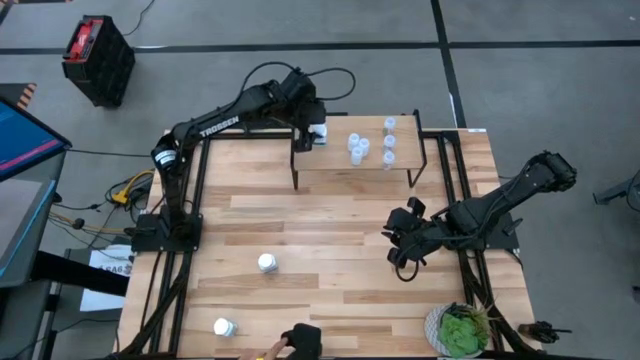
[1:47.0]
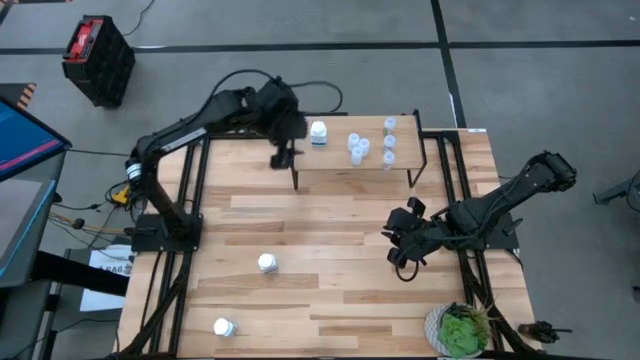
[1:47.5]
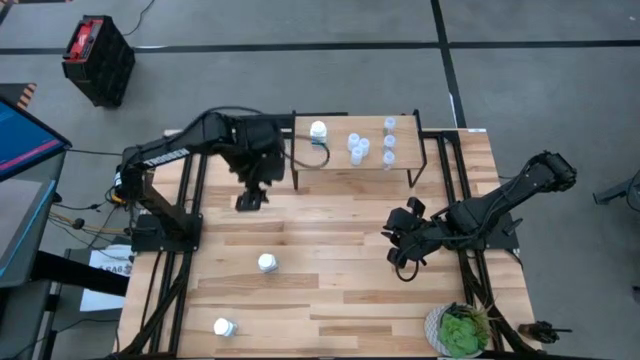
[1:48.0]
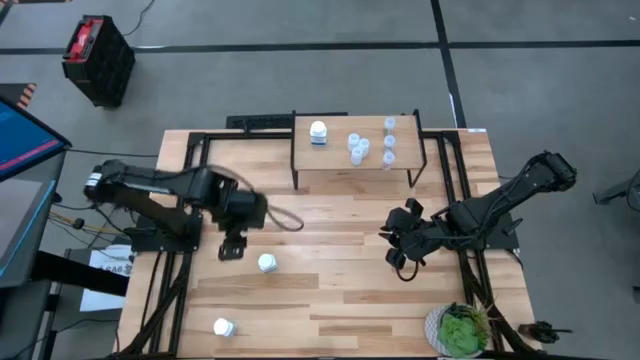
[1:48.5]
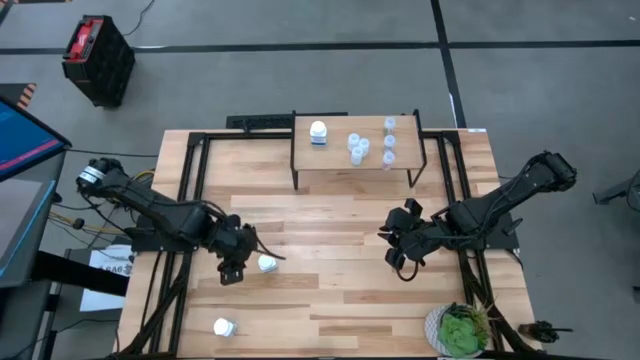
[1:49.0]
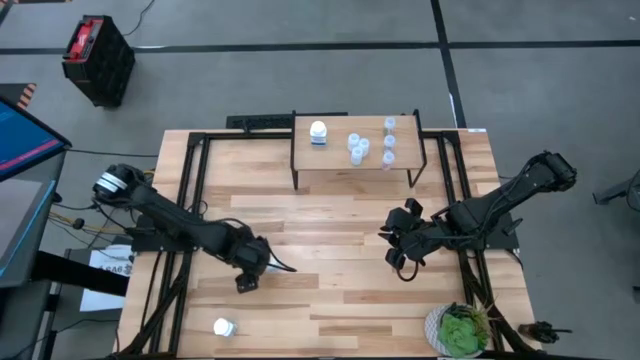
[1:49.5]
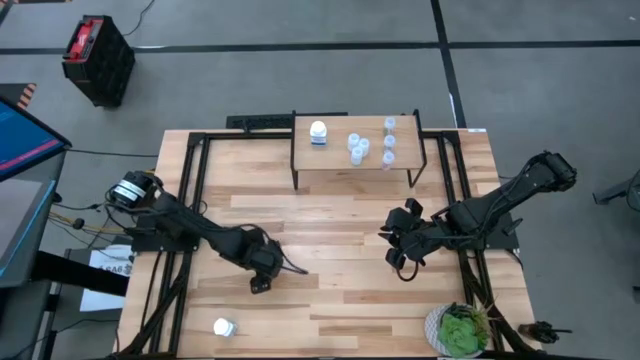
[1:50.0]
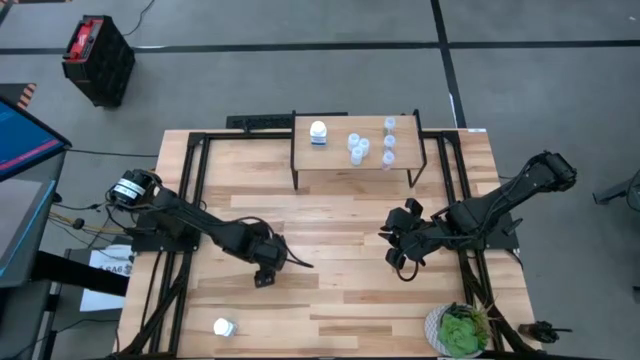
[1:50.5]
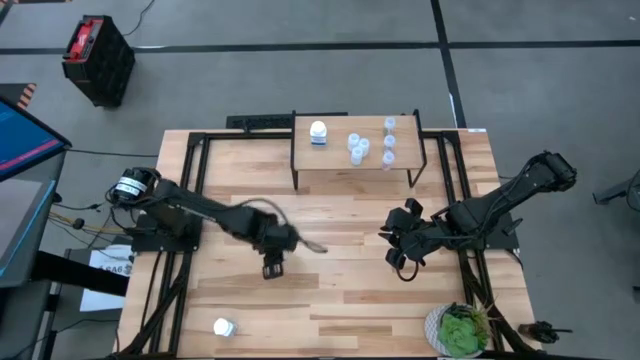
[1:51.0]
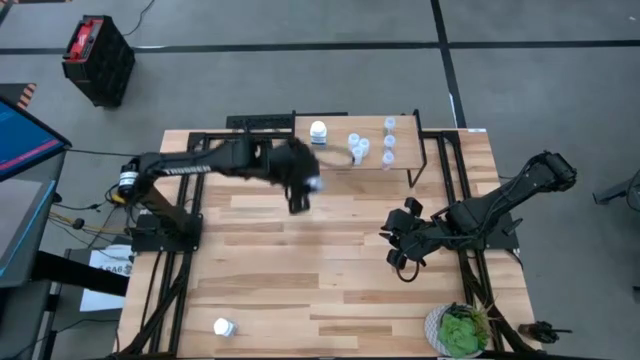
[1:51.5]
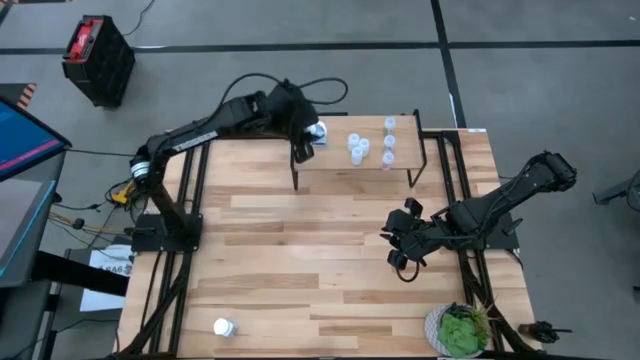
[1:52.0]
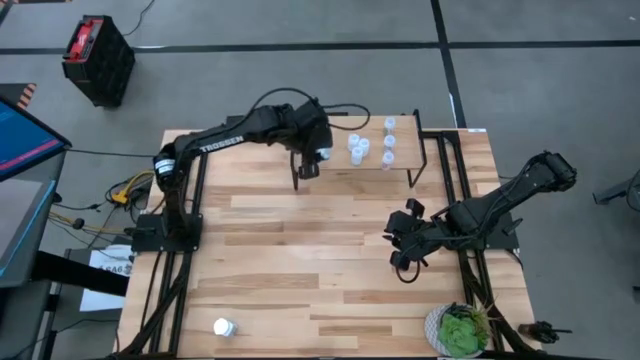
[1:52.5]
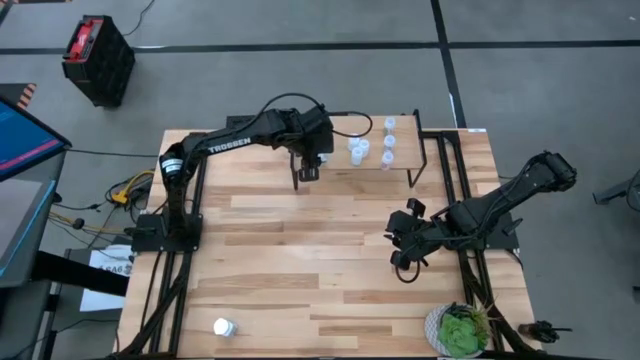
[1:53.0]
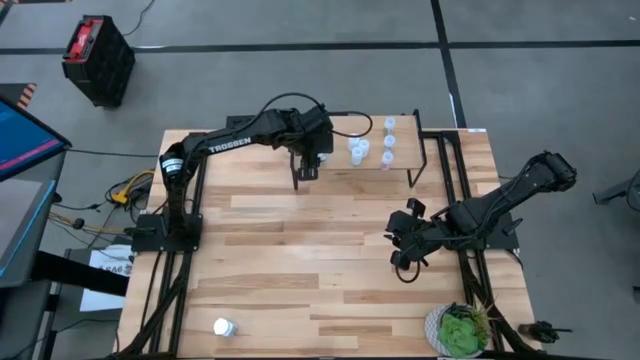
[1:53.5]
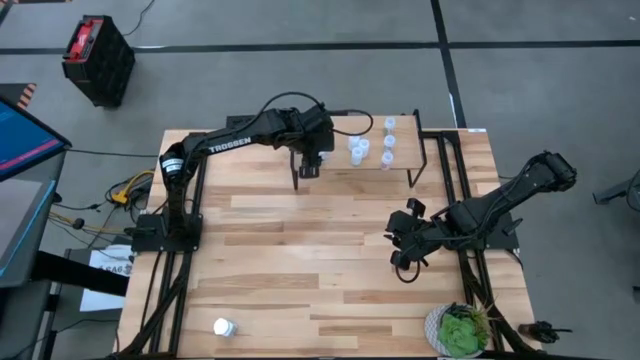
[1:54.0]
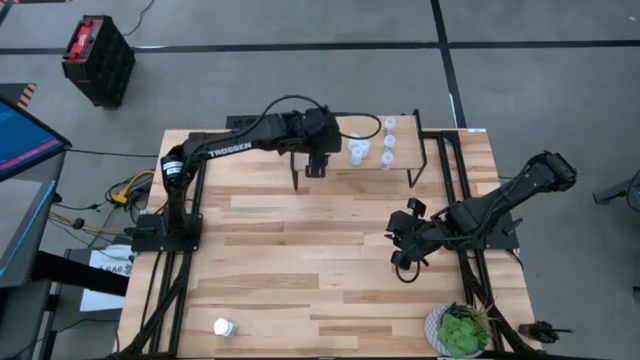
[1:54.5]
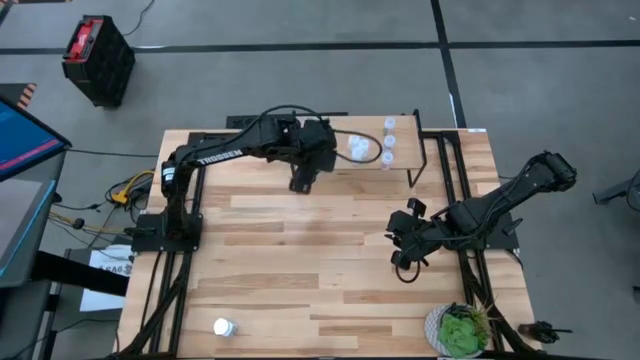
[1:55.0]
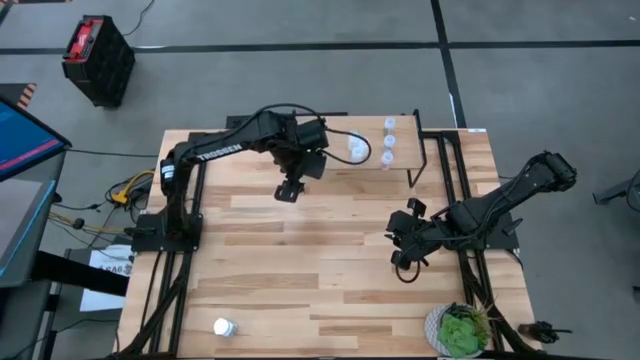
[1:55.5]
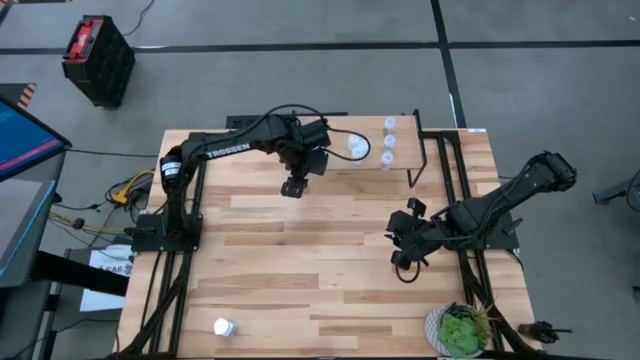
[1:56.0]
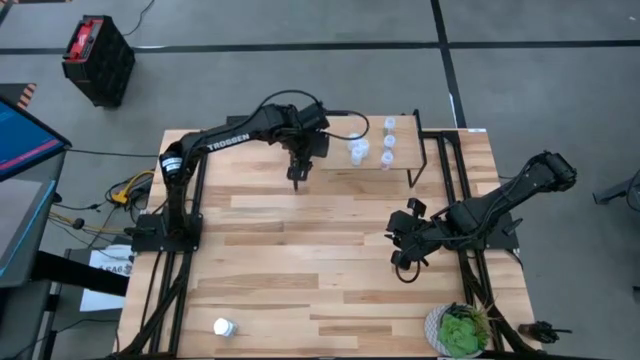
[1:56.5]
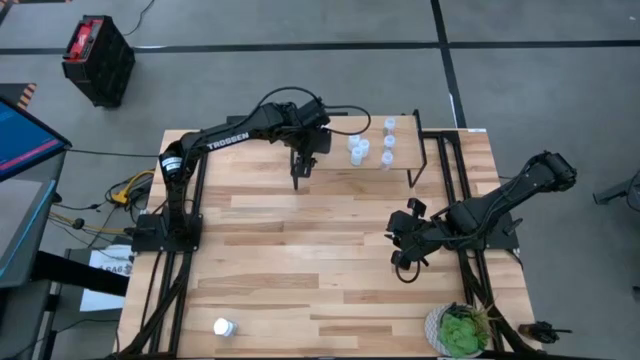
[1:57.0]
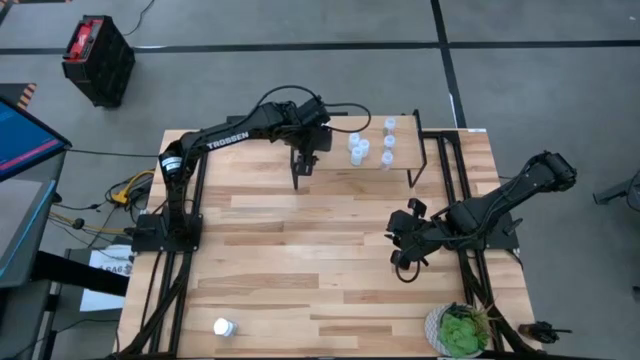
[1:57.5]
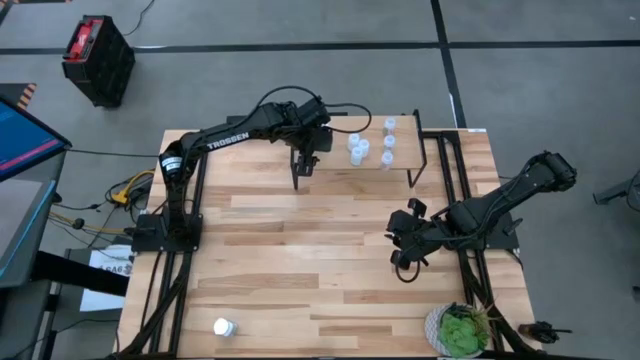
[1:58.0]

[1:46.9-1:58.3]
Task: Pick and place medicine bottles onto shelf by color
Put the top opaque medicine bottle onto the left side of the shelf

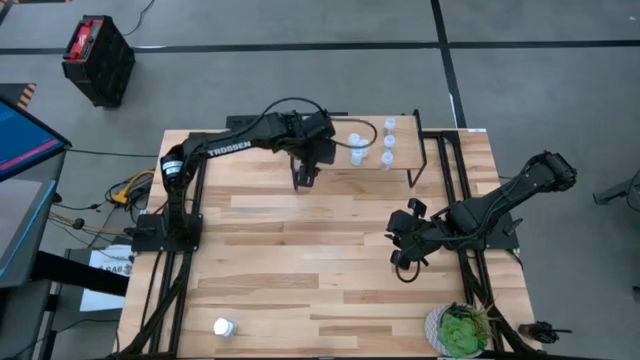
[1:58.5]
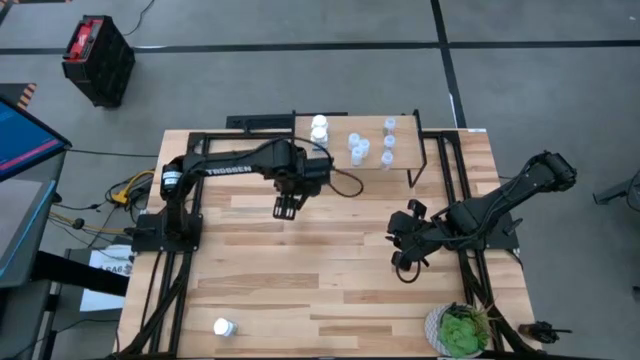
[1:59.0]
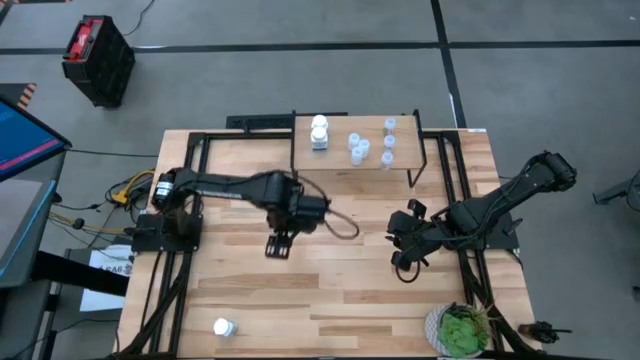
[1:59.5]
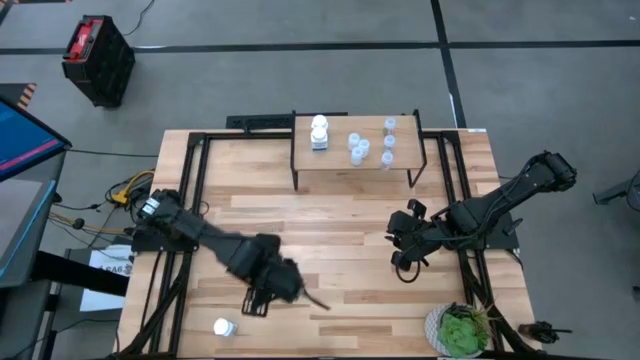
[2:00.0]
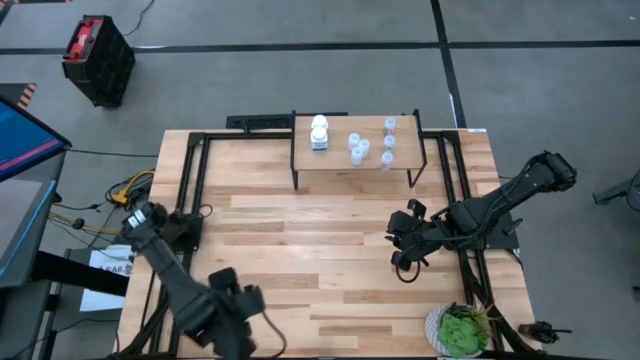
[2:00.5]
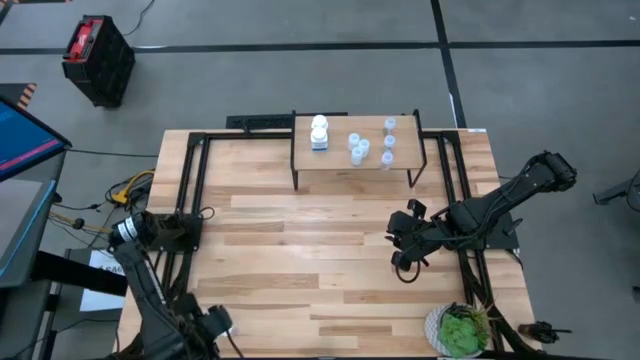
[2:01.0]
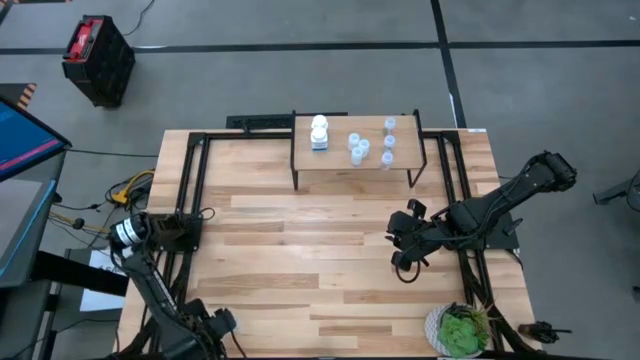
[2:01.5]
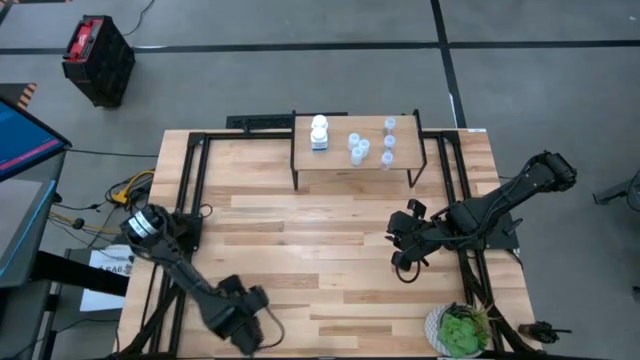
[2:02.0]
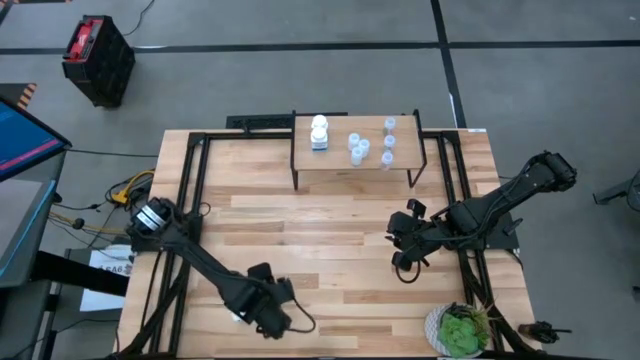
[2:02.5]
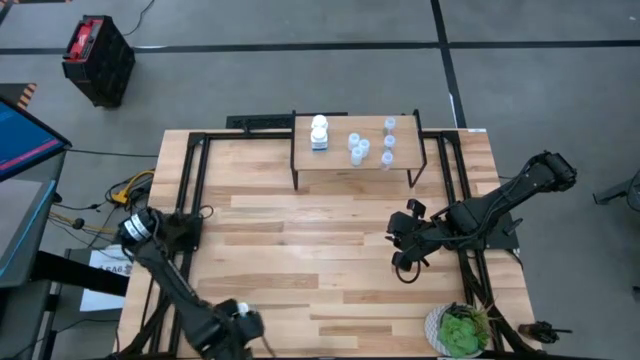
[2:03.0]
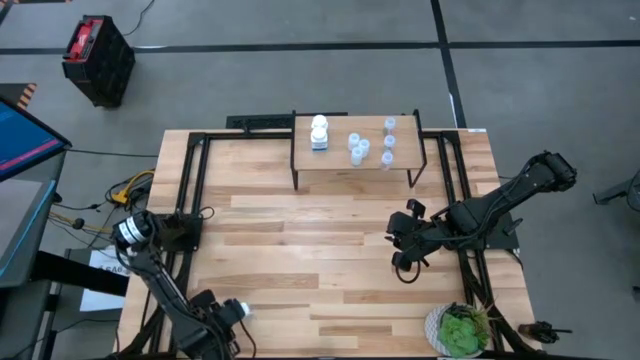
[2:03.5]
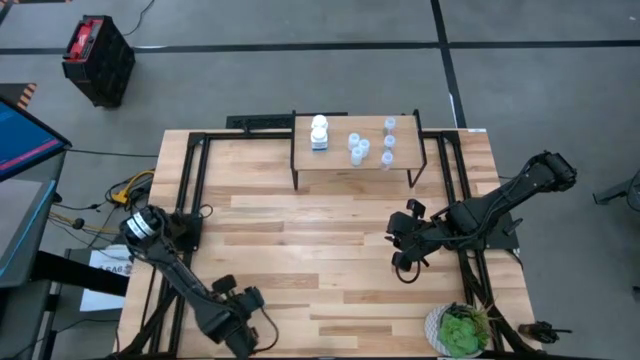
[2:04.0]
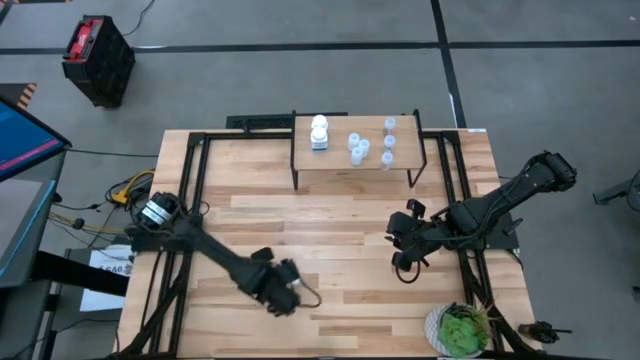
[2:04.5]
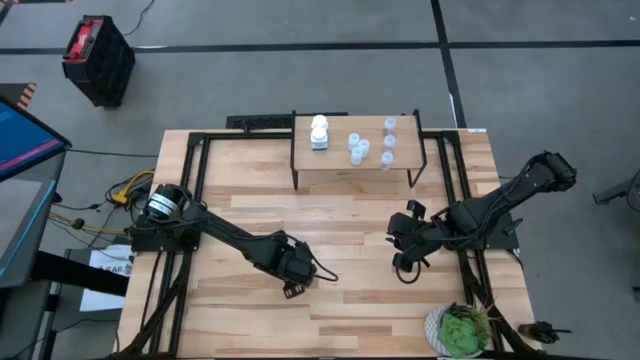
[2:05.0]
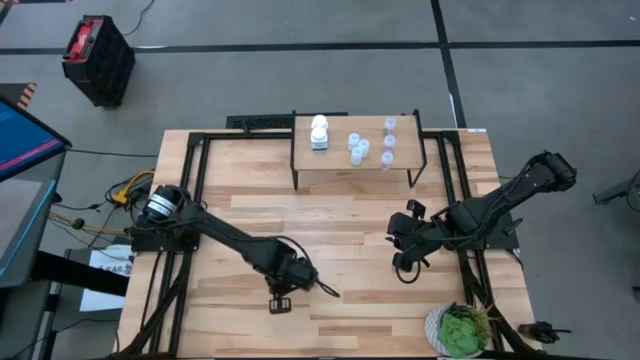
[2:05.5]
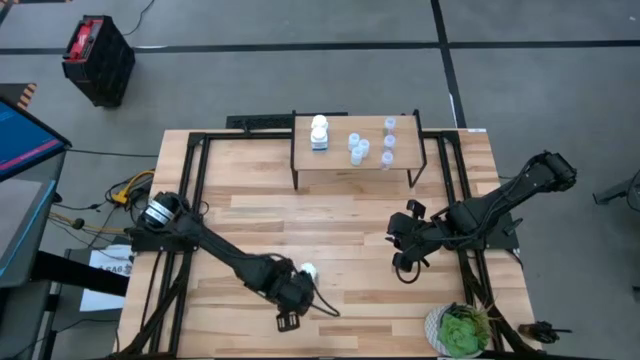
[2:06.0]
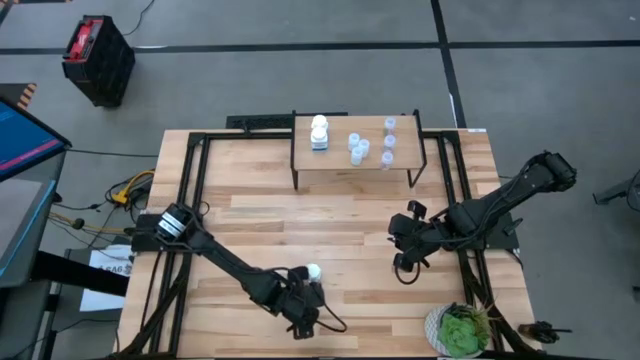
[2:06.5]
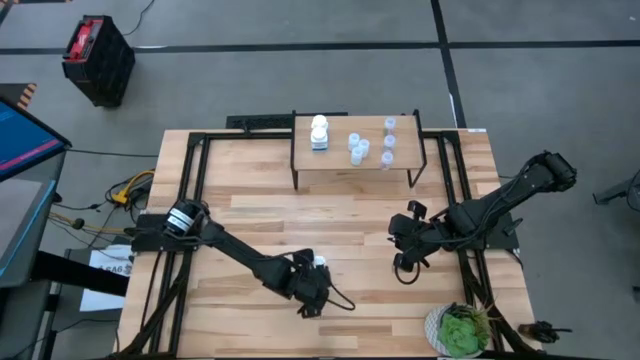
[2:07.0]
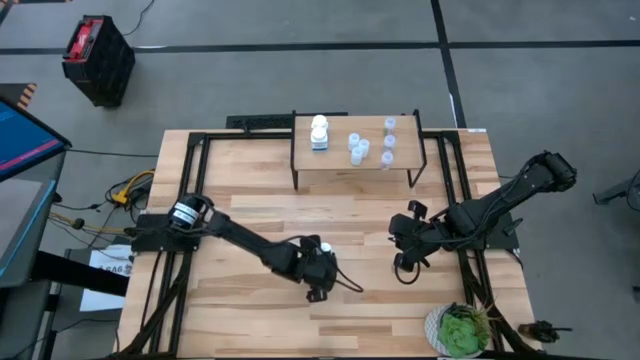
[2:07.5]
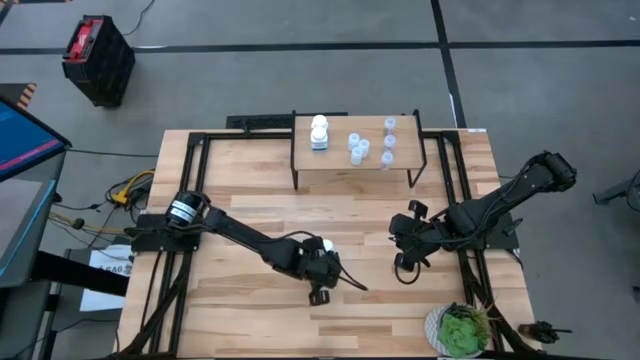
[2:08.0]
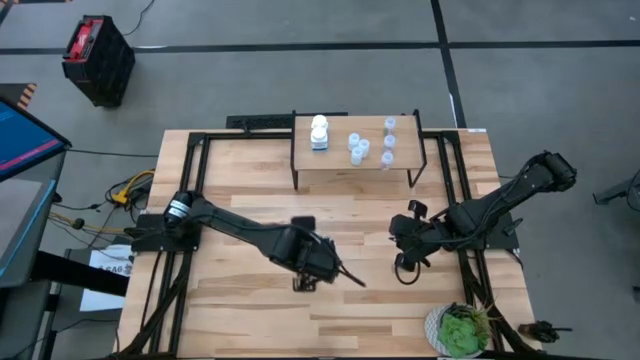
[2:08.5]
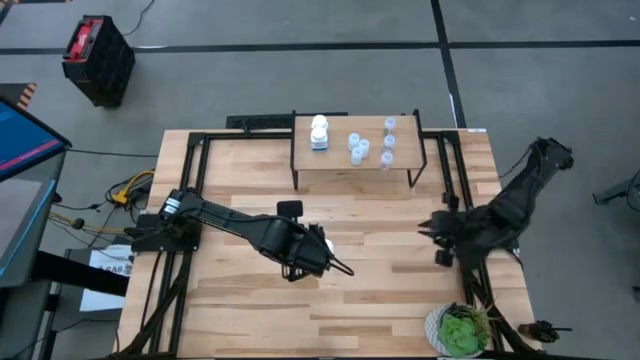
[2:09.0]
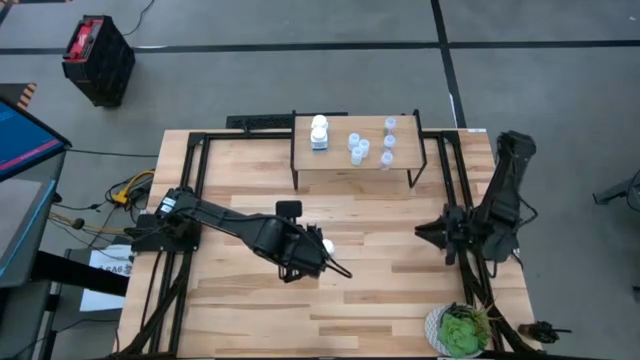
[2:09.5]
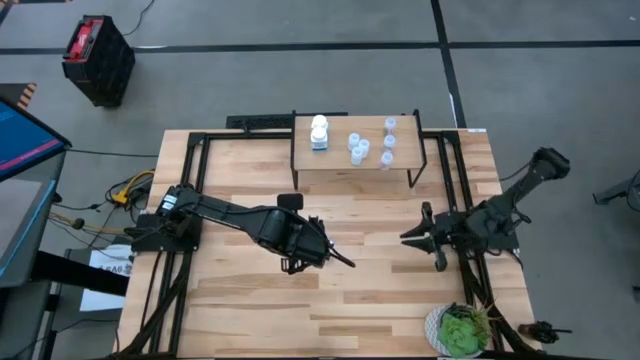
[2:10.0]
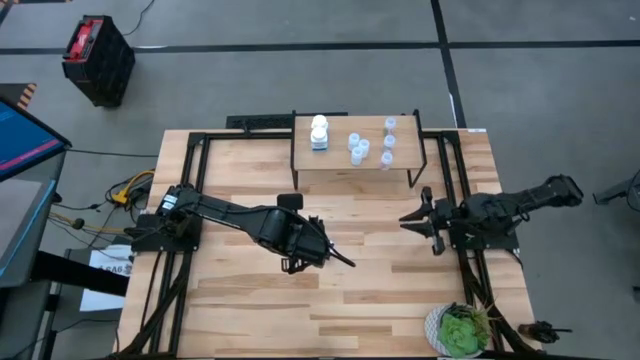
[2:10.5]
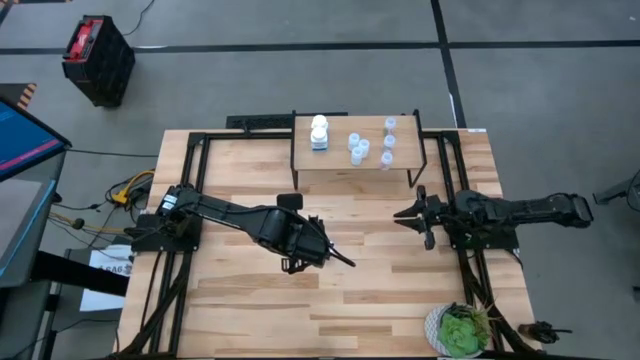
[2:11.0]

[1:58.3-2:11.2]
Put the opaque medicine bottle onto the left side of the shelf
